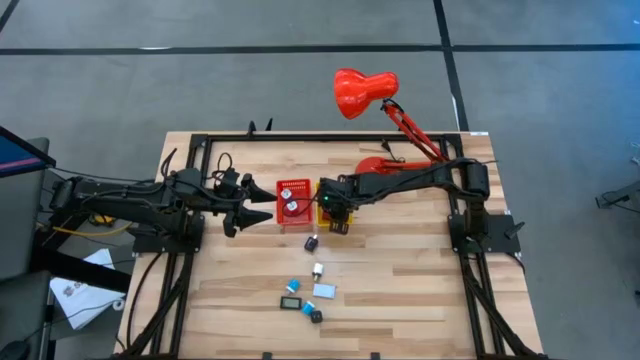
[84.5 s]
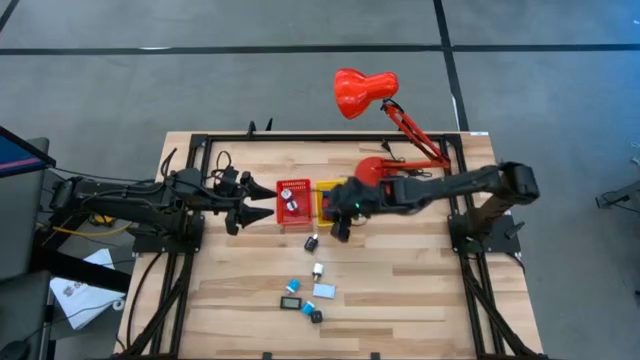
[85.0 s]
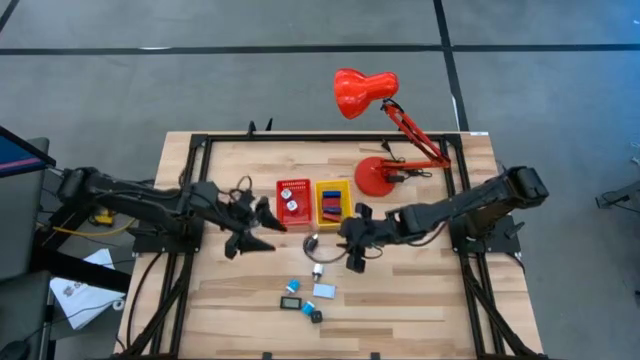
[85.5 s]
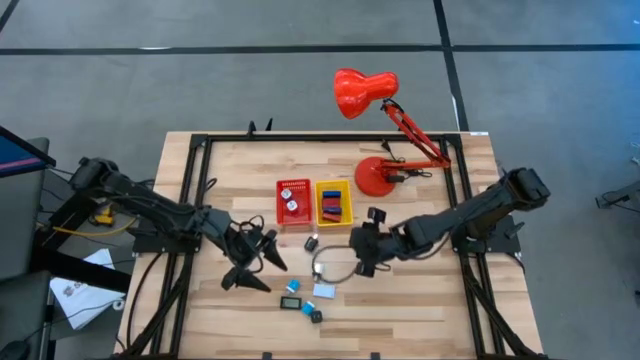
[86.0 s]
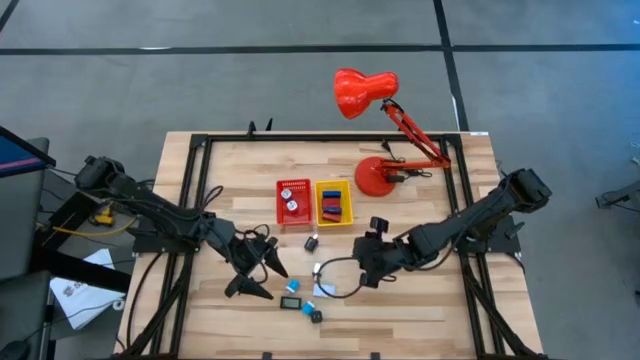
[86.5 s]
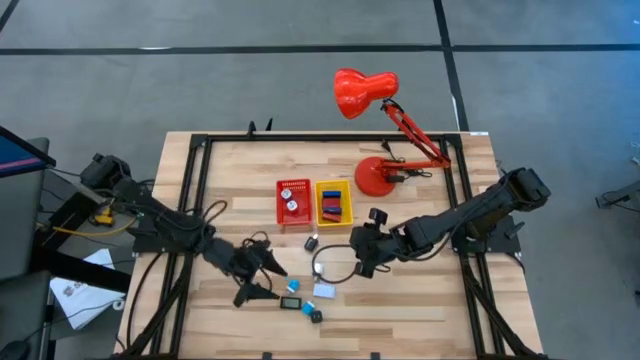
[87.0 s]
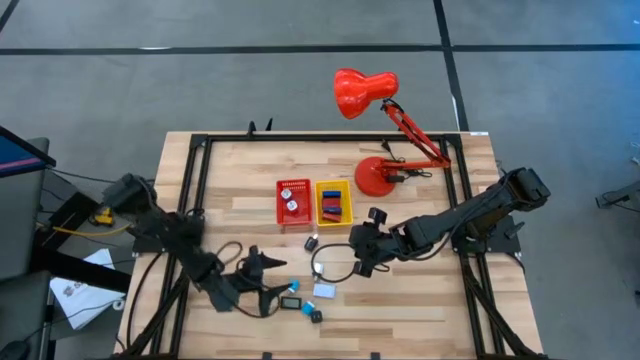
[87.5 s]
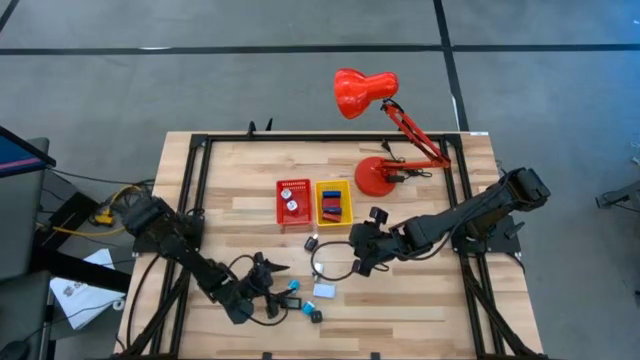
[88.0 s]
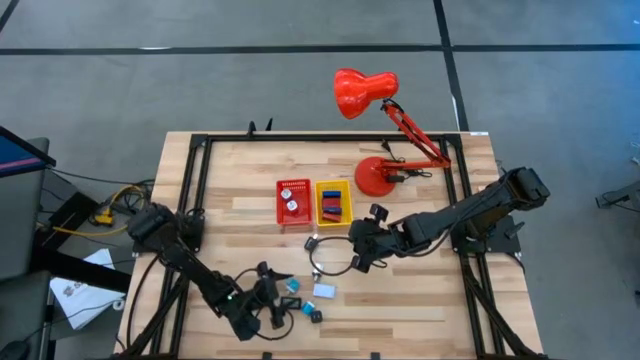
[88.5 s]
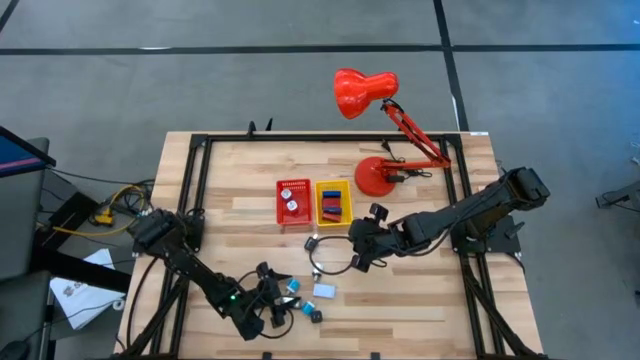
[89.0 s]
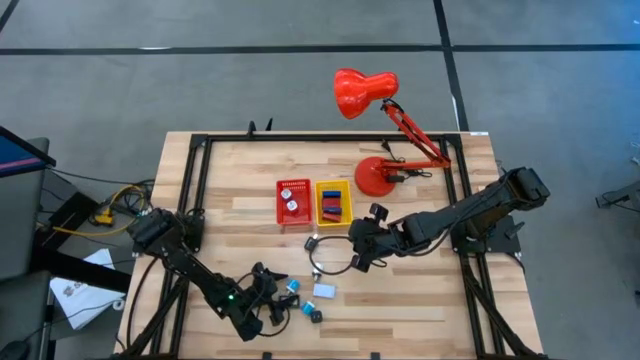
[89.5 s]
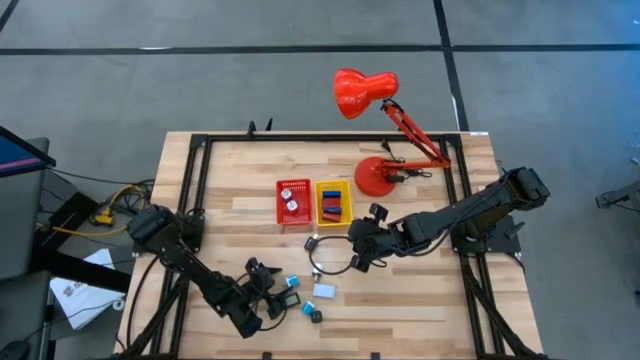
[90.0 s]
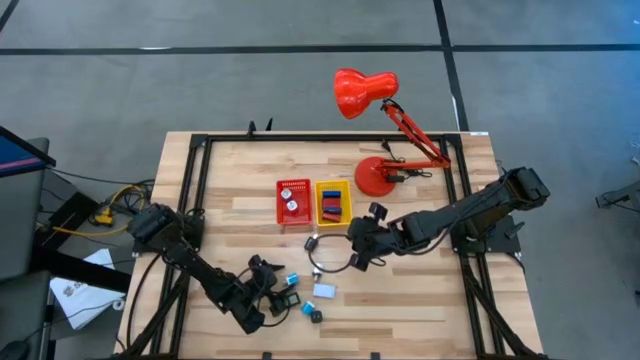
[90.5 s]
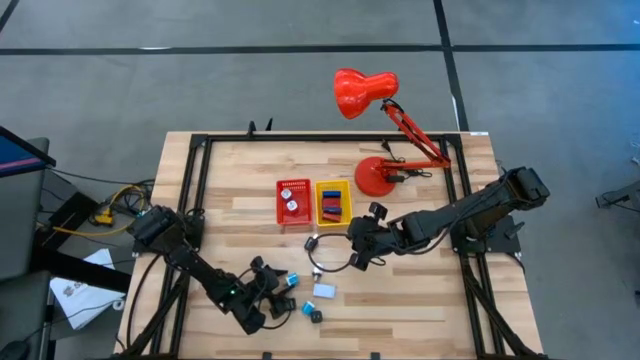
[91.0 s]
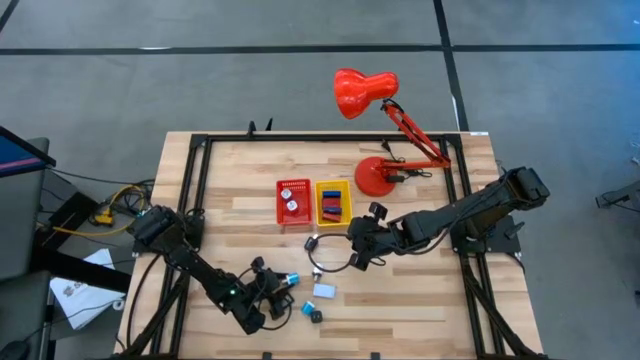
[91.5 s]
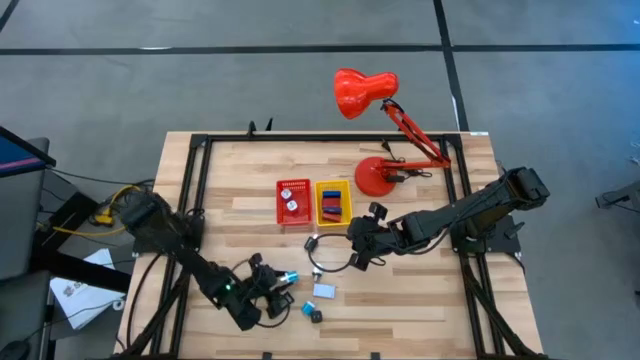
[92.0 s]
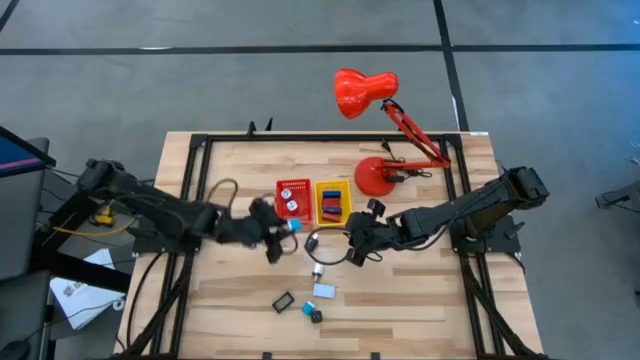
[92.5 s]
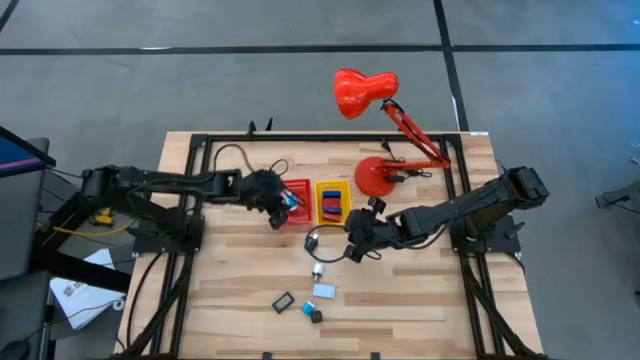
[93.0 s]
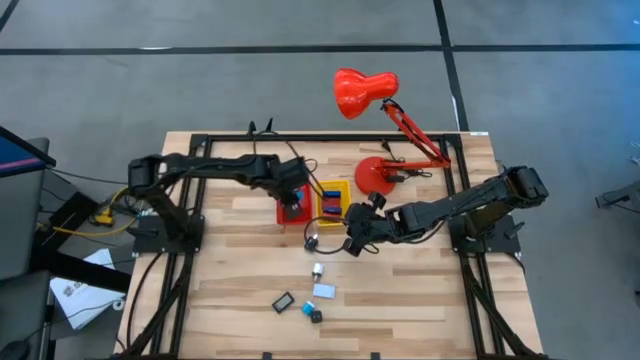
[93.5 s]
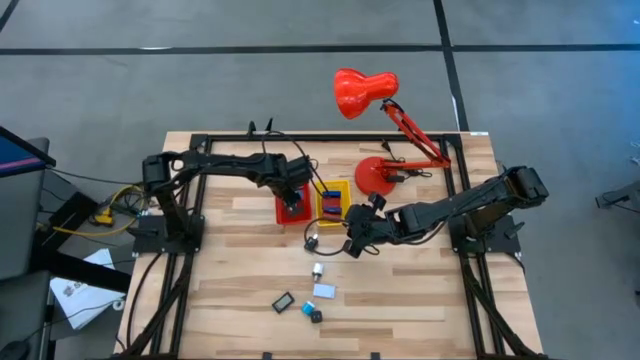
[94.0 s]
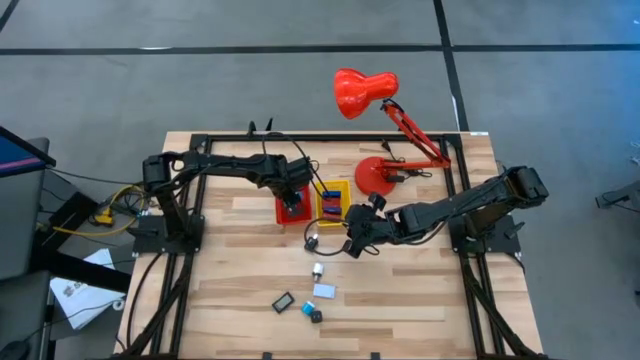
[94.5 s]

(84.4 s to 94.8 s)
Task: Pick & Place Office items
Put the top light blue charger adapter into the red basket

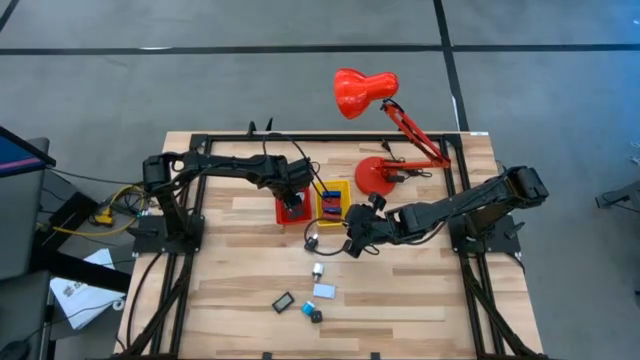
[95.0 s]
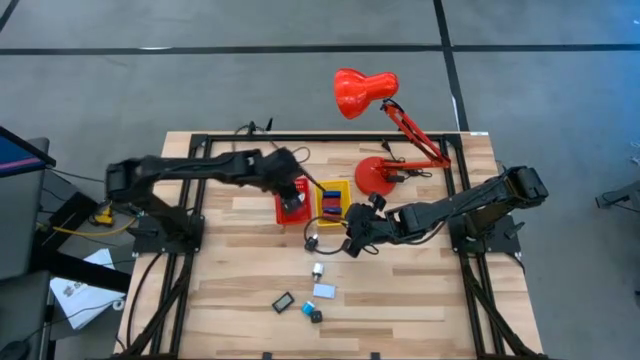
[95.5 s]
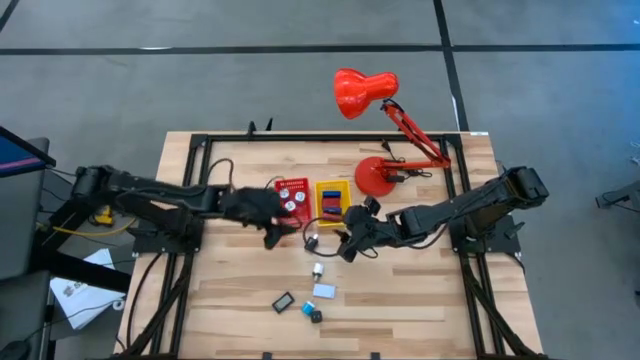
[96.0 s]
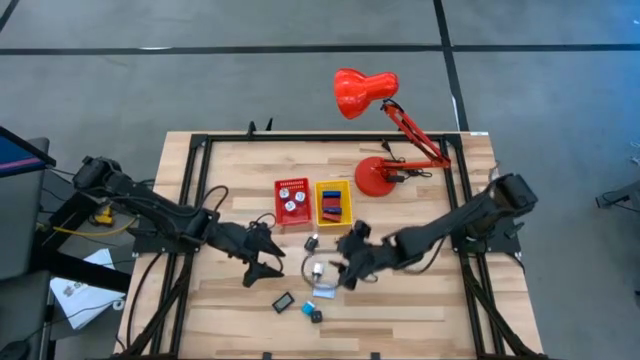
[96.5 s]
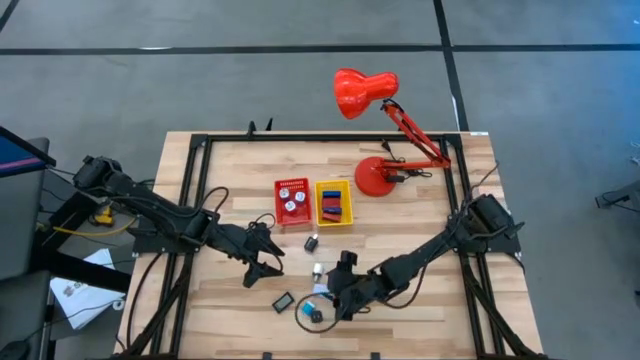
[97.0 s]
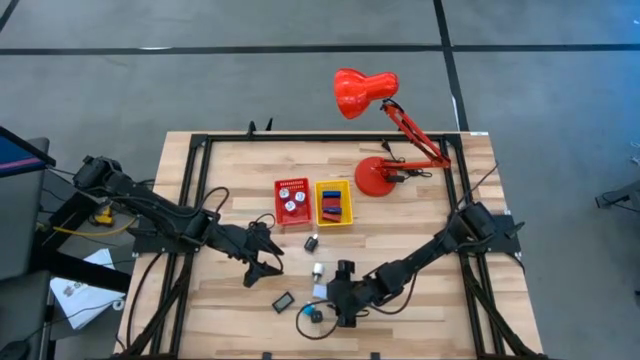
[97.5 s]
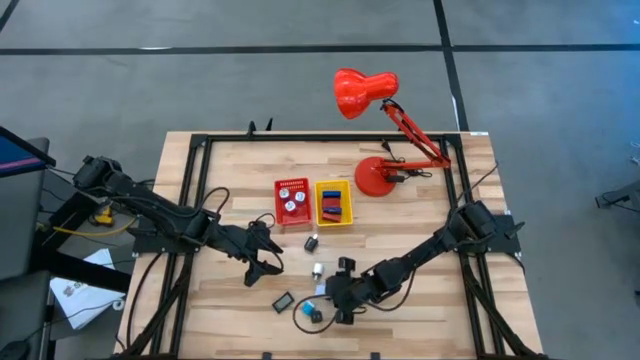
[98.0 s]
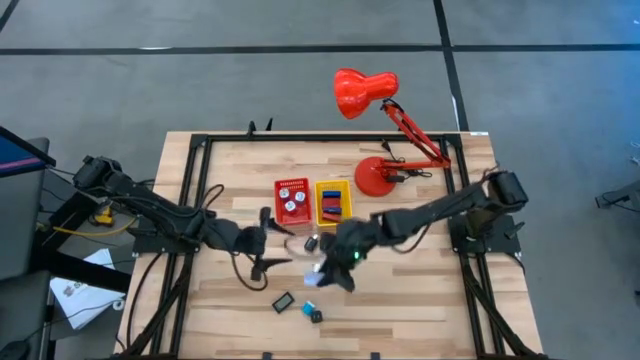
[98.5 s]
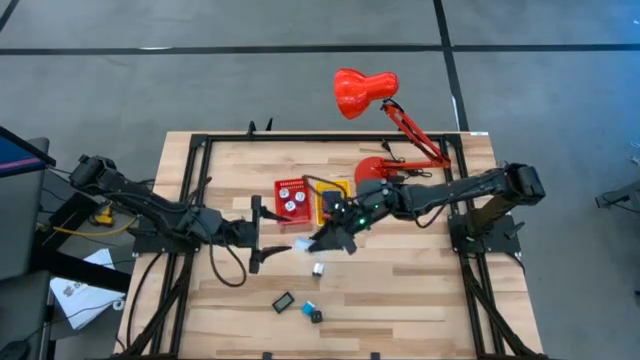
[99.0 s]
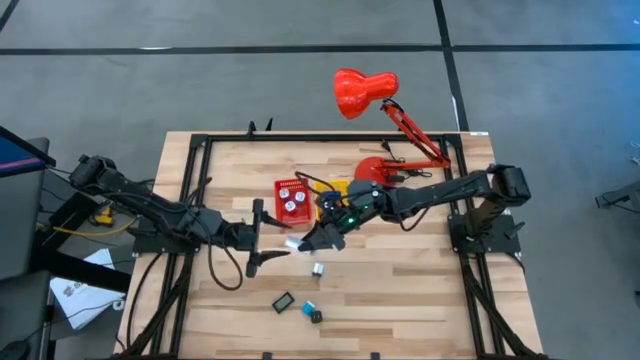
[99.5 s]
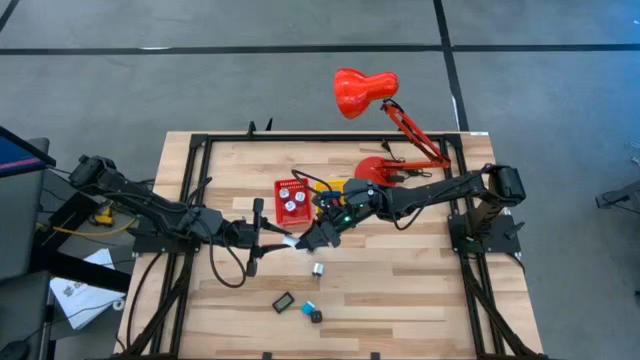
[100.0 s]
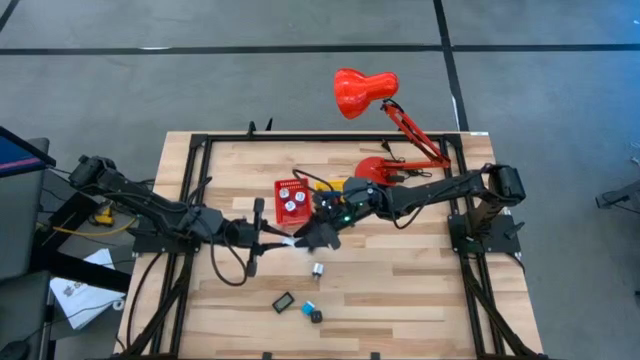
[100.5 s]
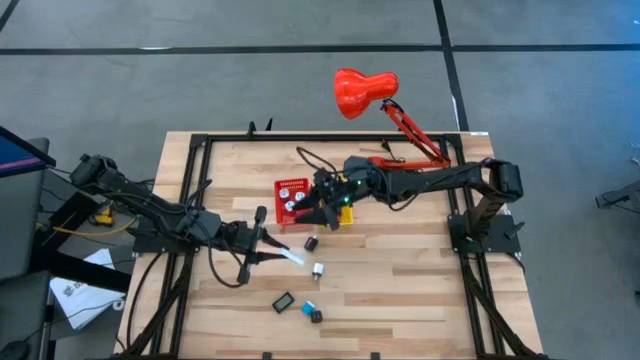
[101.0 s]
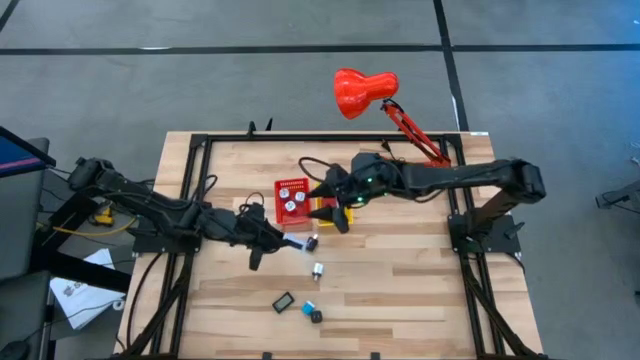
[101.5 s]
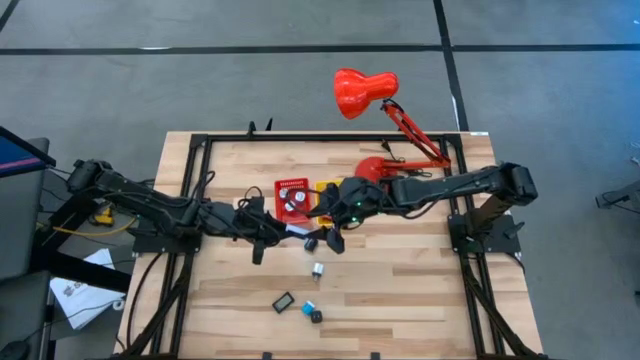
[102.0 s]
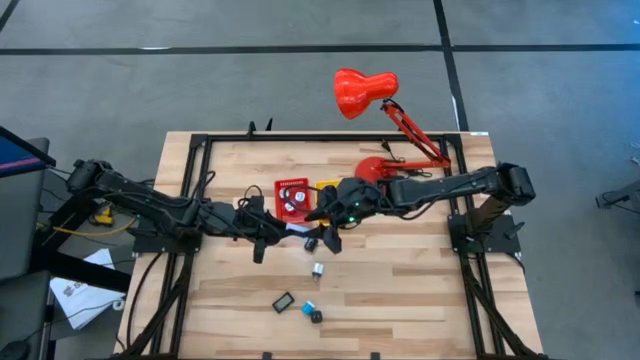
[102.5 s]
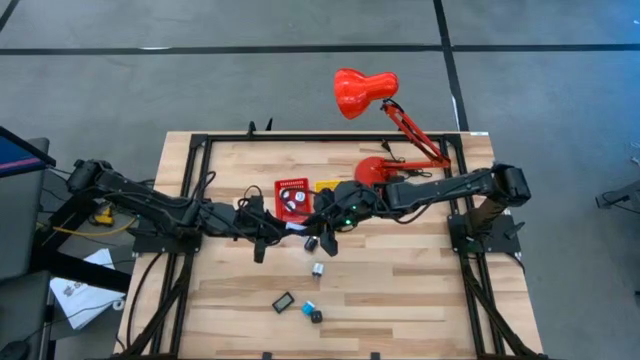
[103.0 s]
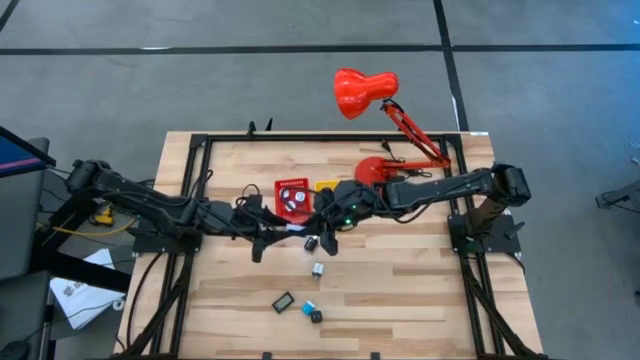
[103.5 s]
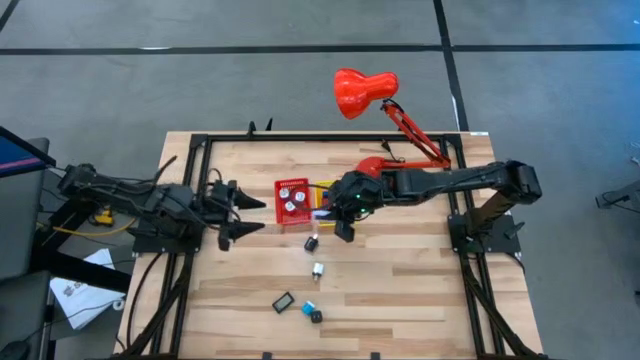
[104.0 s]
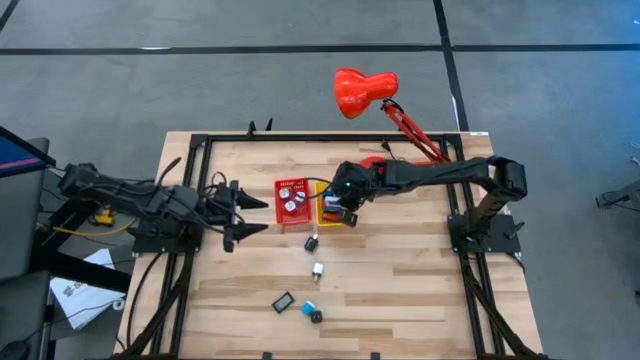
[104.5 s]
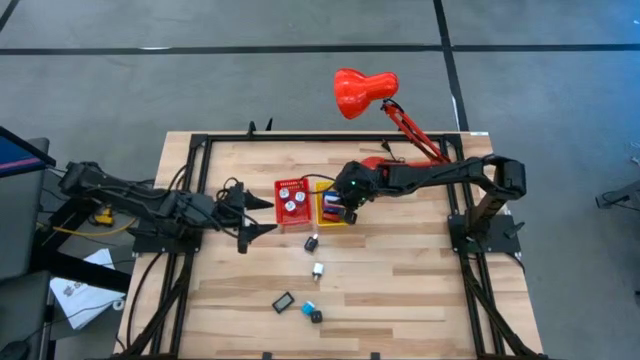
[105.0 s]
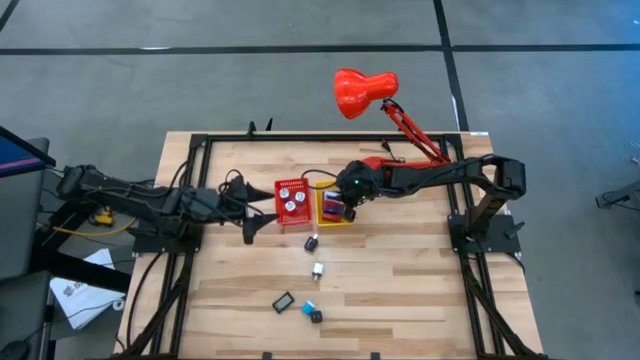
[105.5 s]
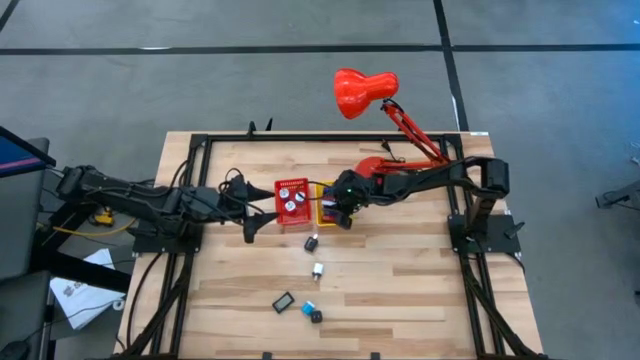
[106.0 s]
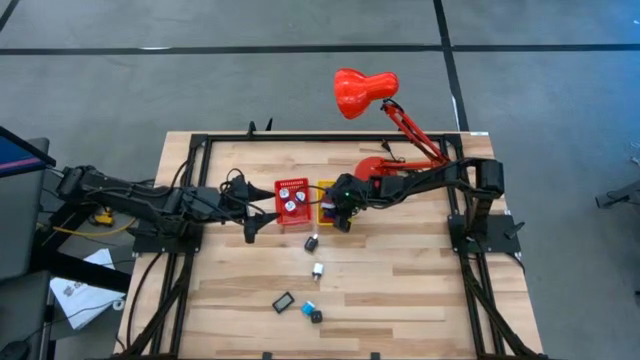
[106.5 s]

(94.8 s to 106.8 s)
Put the white digital timer into the yellow basket
